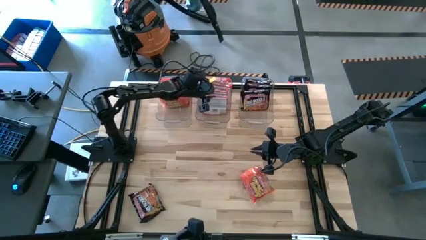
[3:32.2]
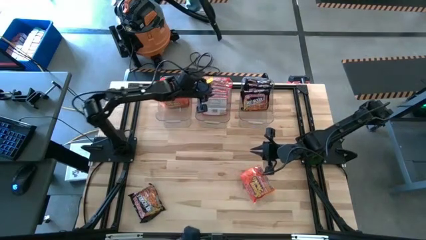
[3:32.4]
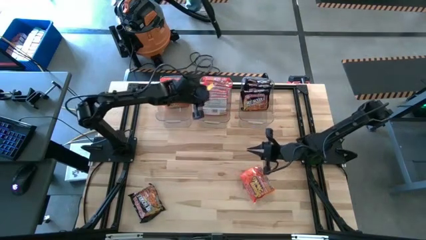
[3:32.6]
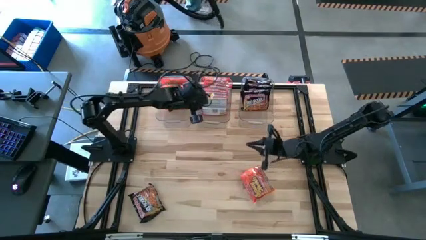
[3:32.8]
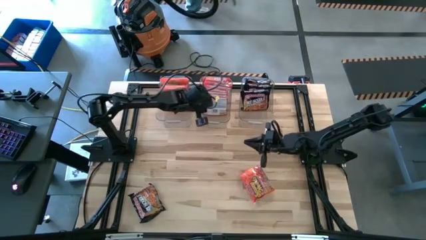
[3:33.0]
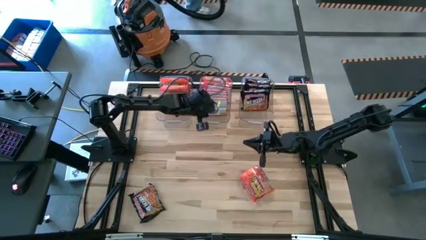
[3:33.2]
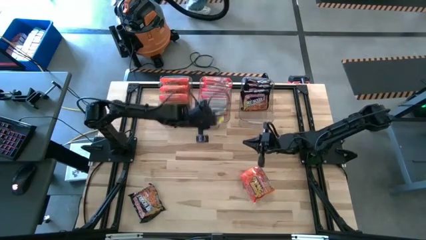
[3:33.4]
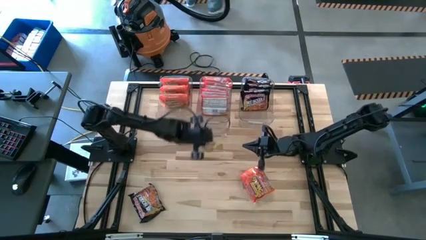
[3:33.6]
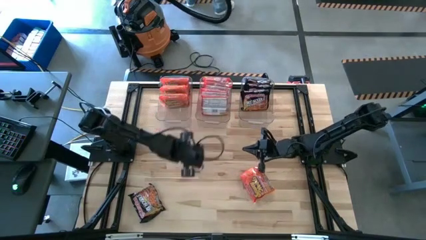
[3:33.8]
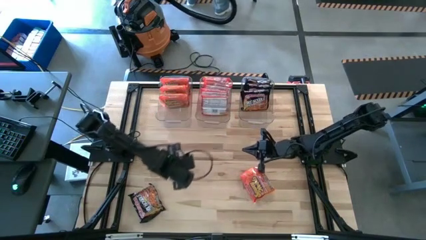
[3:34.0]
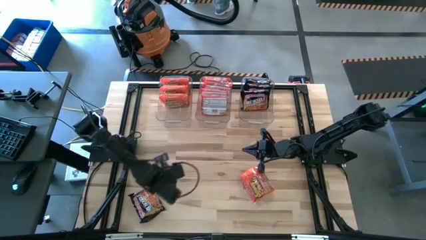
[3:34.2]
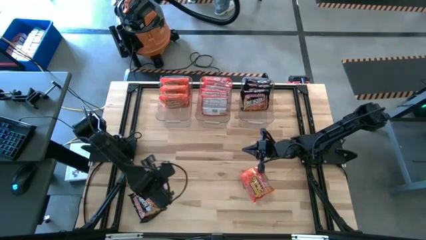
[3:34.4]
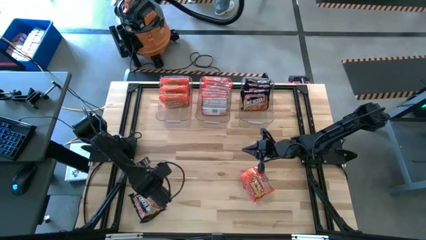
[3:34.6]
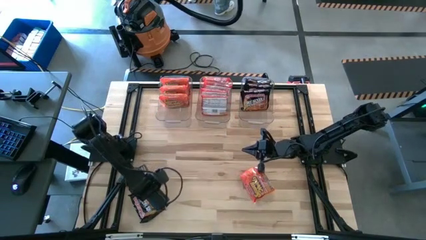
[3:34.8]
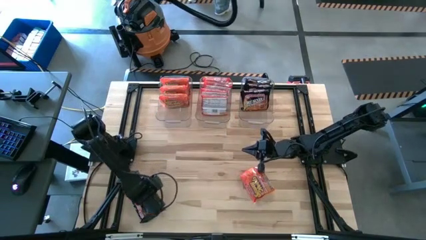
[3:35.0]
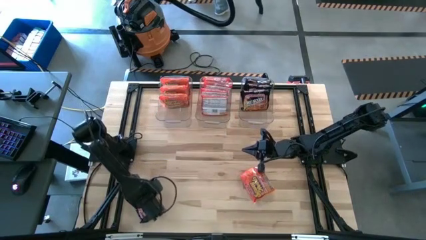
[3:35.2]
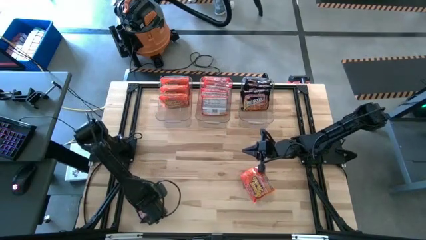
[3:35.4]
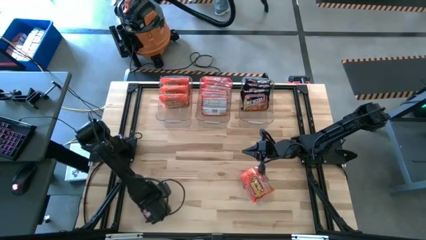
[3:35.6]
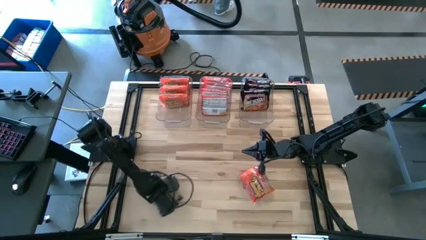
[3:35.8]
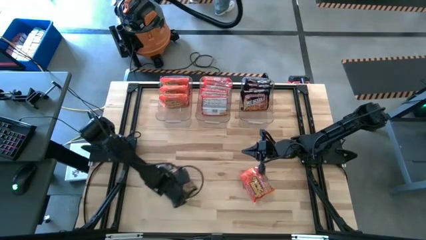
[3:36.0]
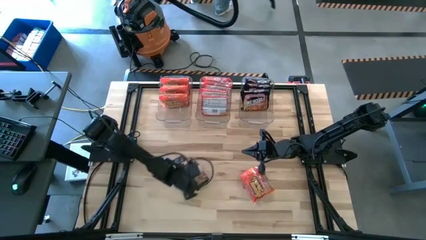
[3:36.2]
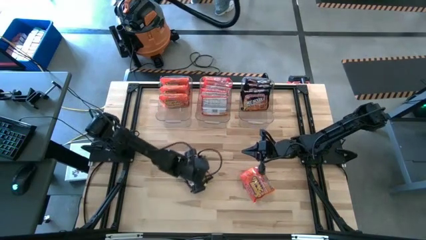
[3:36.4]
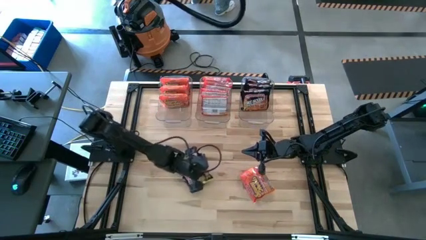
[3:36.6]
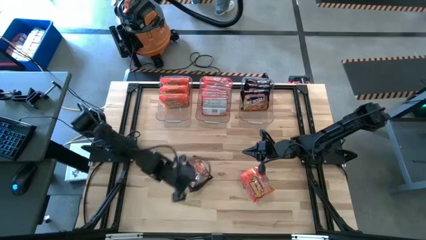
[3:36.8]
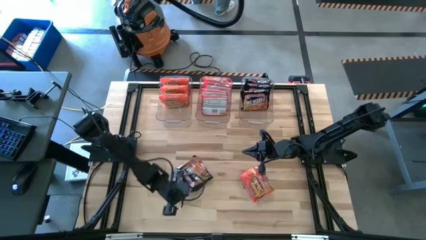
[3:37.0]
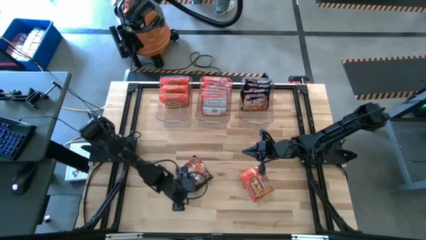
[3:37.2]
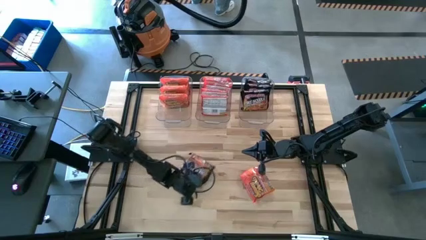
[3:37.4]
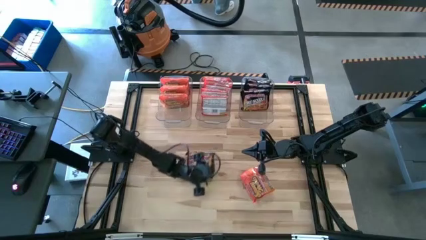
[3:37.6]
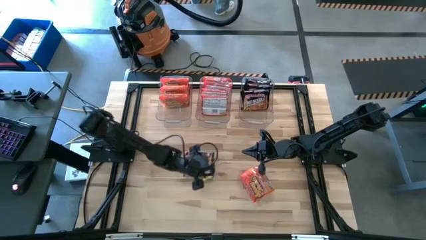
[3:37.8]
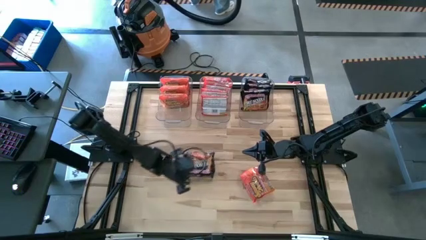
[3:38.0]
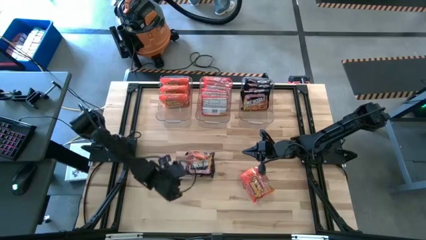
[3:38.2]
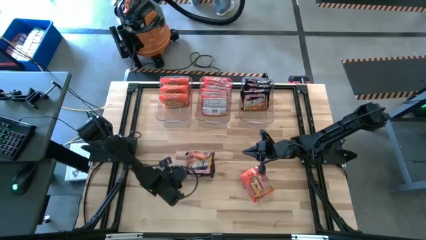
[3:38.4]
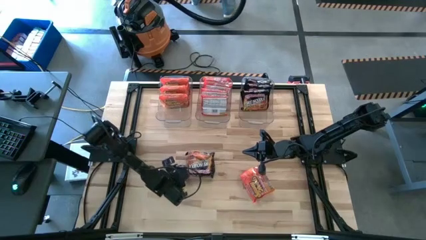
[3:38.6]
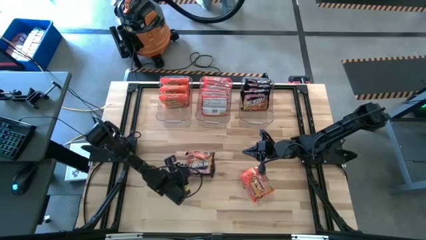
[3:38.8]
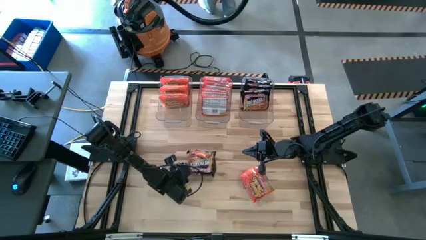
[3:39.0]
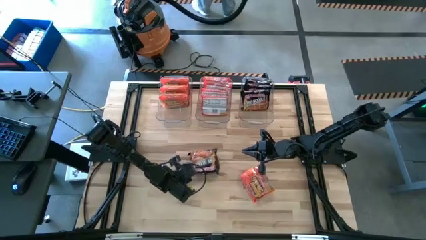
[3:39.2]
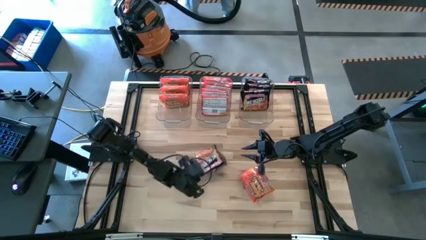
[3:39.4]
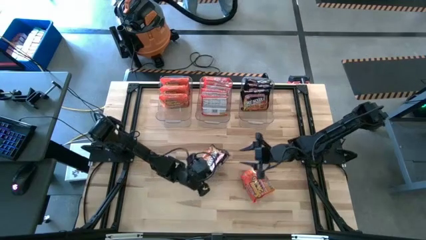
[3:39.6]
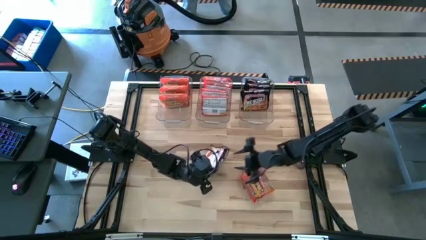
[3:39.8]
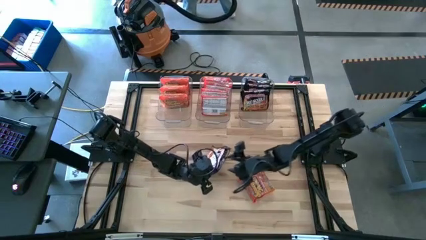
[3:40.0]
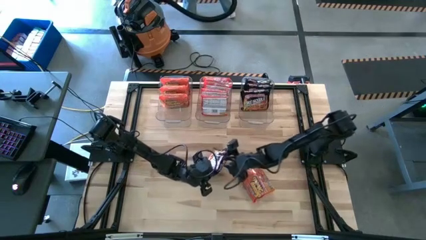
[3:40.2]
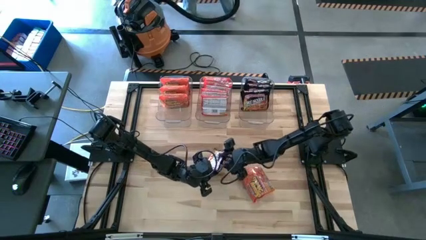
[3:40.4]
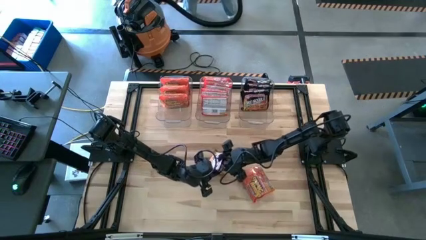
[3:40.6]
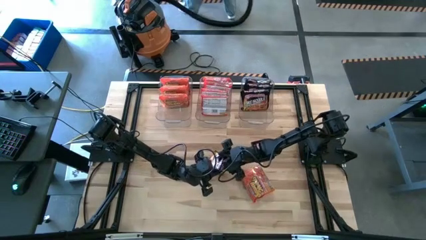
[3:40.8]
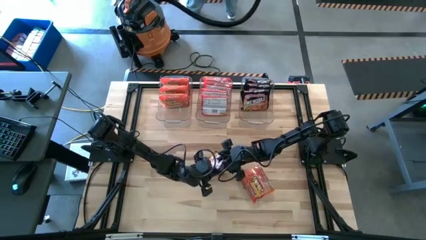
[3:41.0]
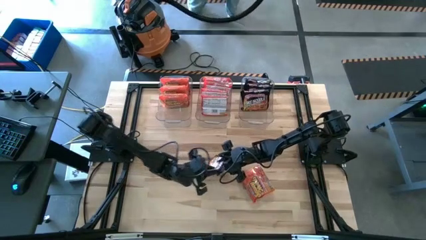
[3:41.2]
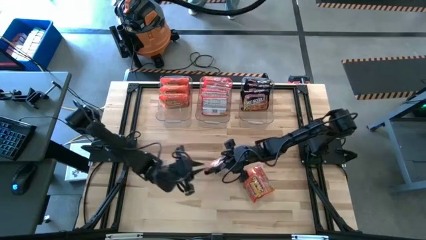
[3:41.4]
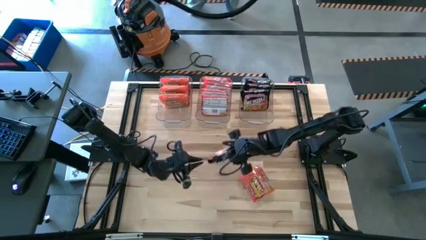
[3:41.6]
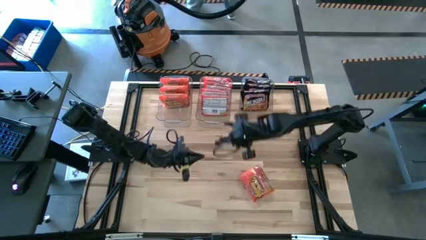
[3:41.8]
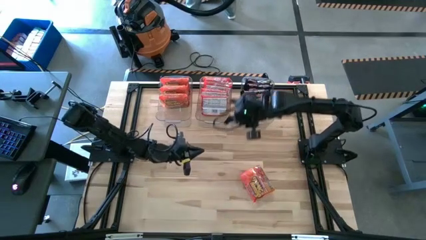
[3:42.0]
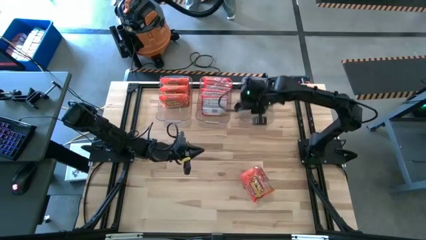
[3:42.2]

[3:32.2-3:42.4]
Task: Sort Maruchan noodles
Put the black noodle pack into the right transparent bin

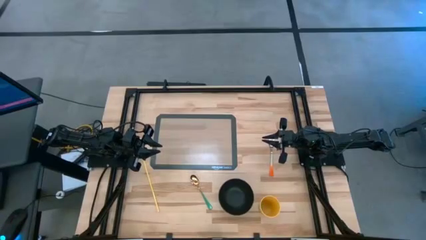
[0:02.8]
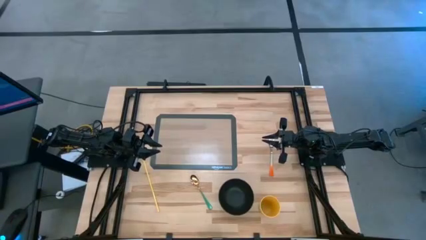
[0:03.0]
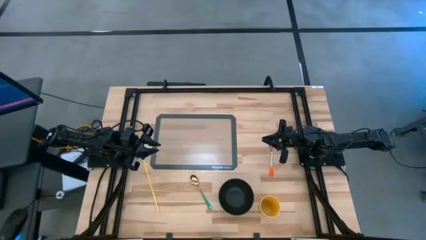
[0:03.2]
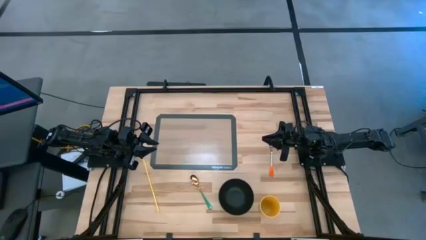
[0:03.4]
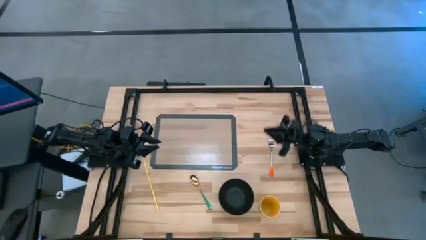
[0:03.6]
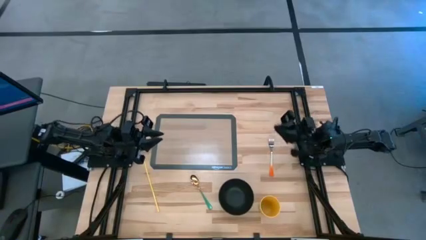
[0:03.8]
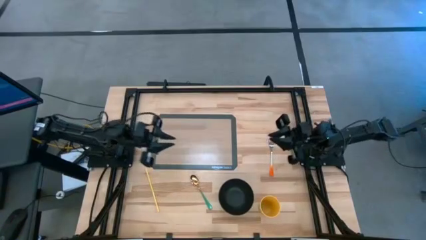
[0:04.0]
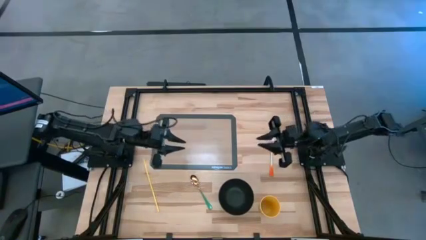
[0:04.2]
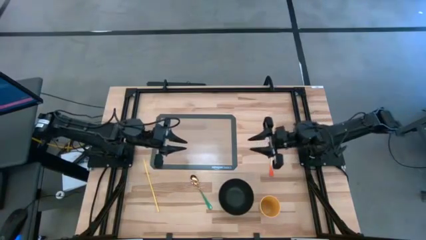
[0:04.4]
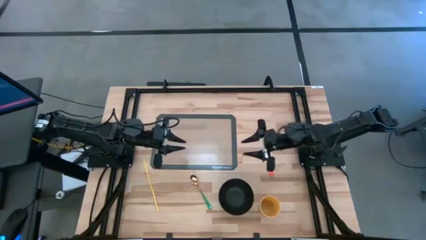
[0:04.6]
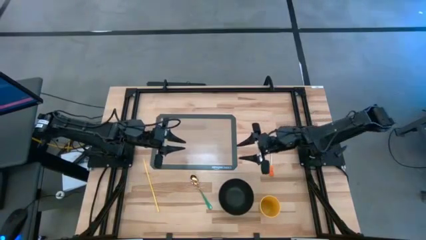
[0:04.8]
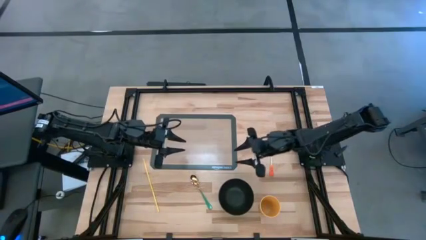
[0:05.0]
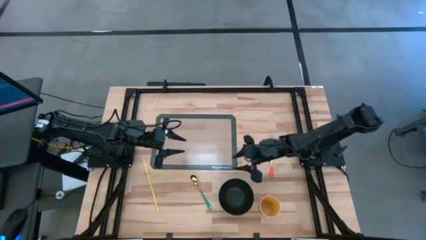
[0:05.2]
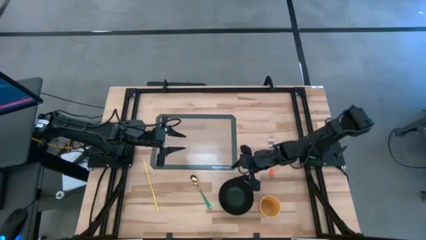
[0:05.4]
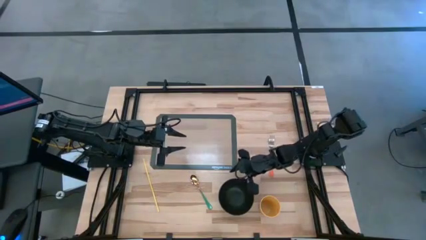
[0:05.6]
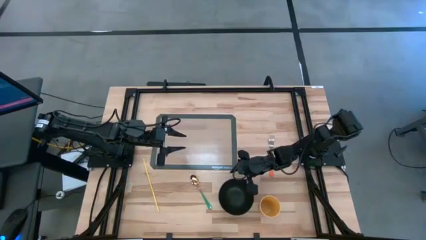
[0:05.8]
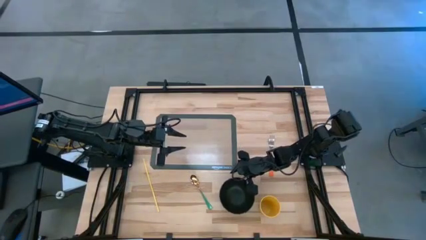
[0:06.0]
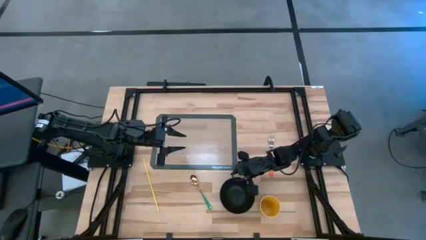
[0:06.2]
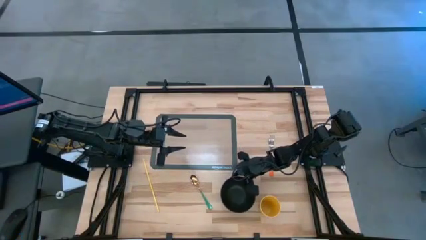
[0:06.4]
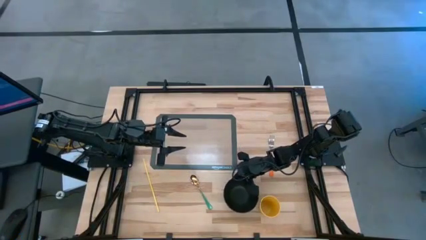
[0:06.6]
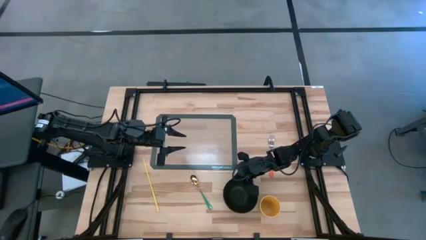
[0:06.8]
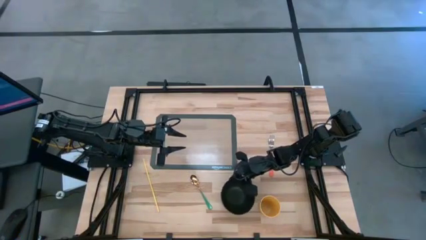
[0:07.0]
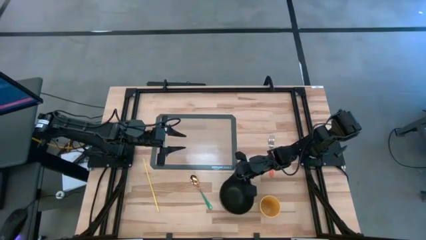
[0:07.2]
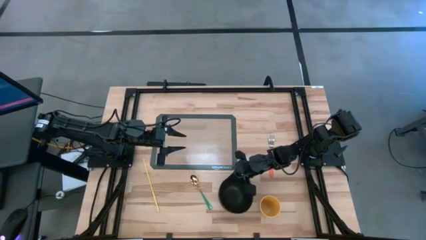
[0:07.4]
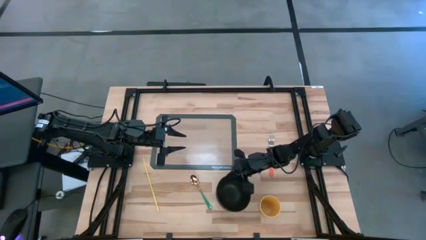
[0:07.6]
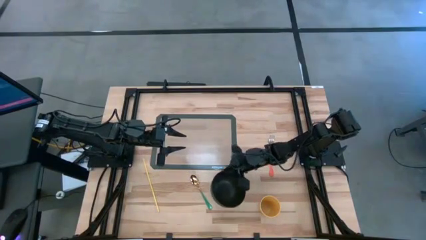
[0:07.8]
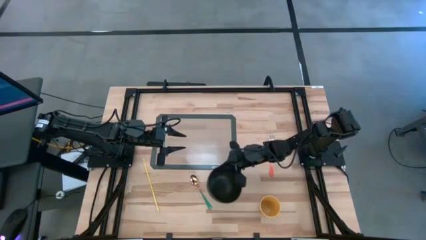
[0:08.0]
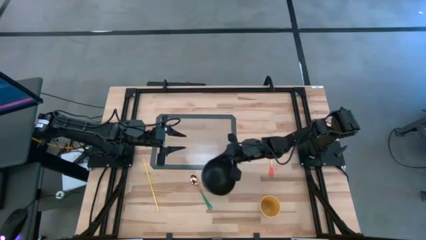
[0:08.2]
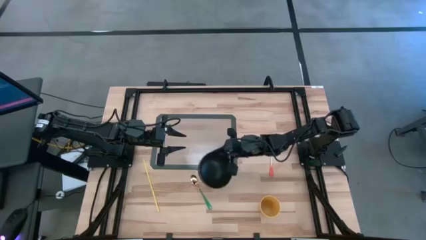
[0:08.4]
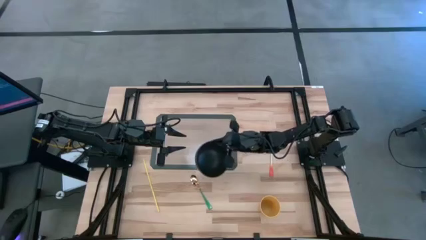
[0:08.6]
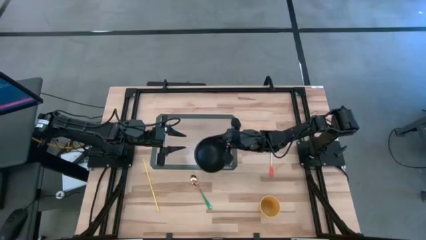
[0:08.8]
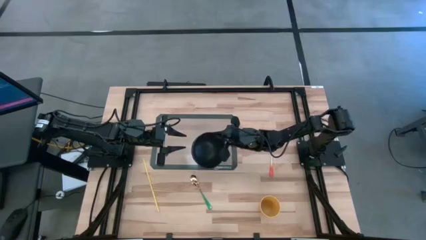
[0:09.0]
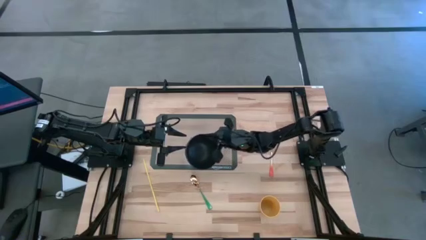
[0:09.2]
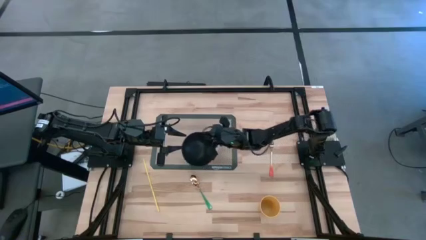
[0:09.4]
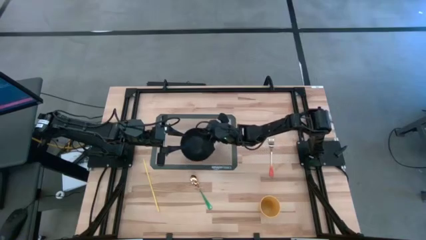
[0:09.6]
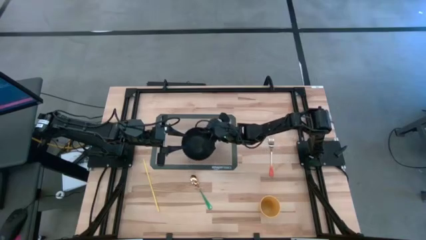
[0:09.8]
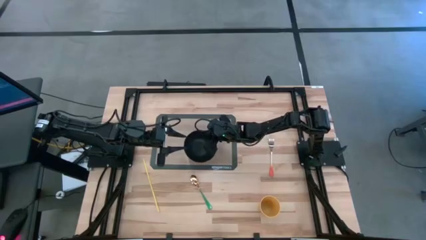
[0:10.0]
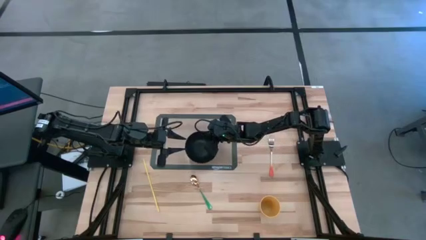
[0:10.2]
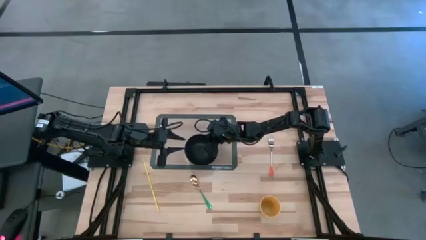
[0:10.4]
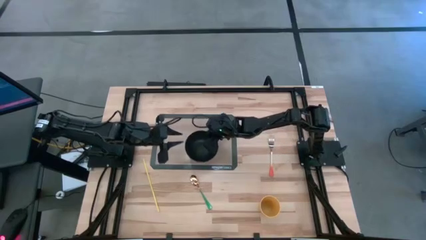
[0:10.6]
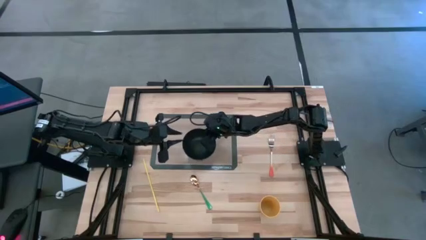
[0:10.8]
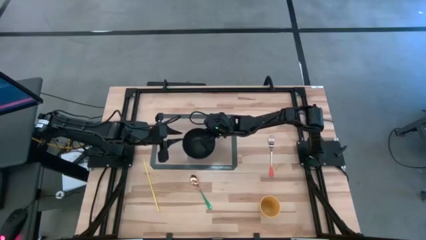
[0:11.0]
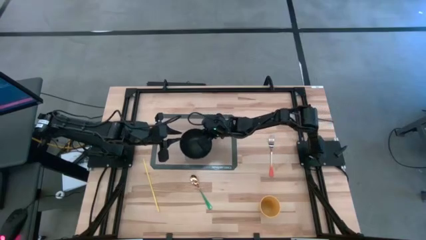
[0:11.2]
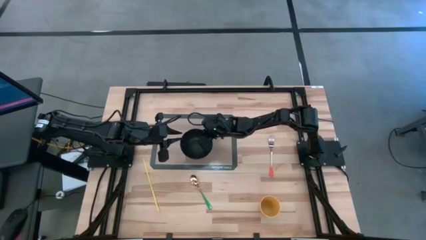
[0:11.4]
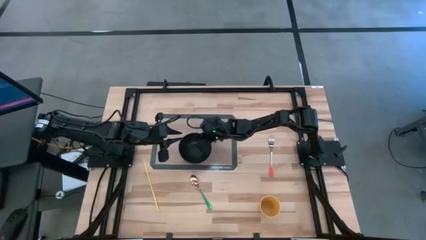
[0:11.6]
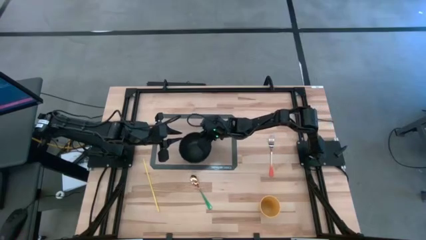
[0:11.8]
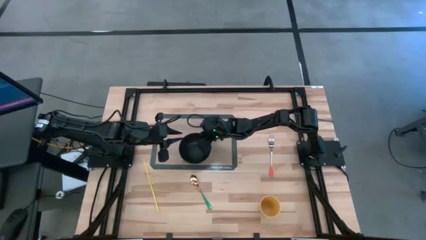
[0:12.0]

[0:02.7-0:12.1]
Task: Pick & Place Utensil
Put the black bowl on the transparent mat
